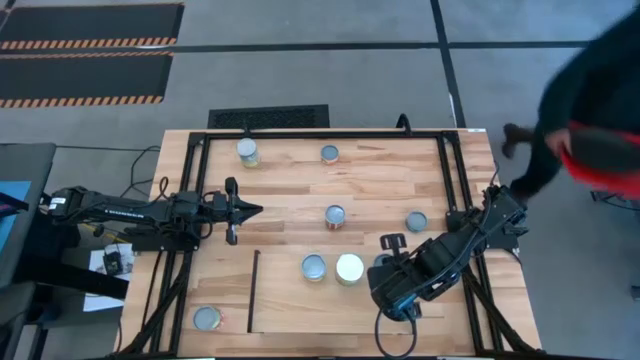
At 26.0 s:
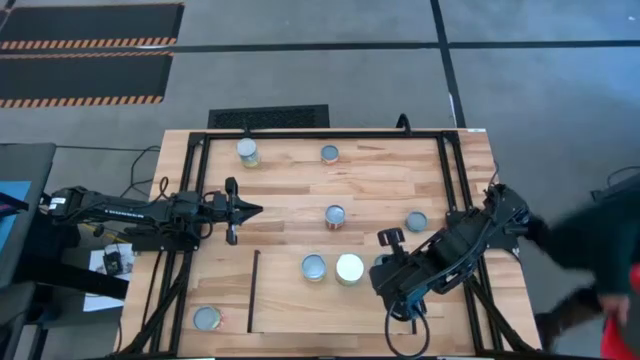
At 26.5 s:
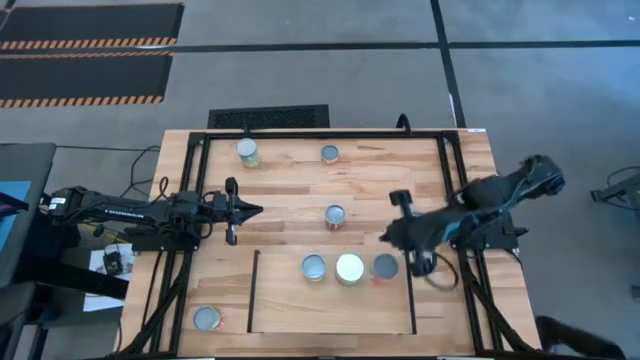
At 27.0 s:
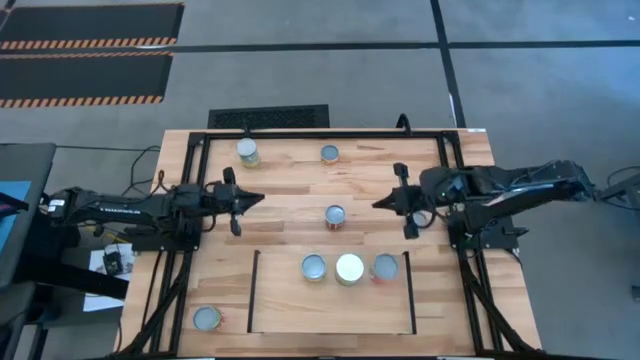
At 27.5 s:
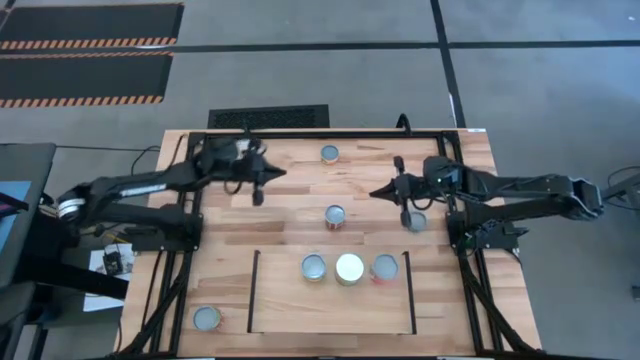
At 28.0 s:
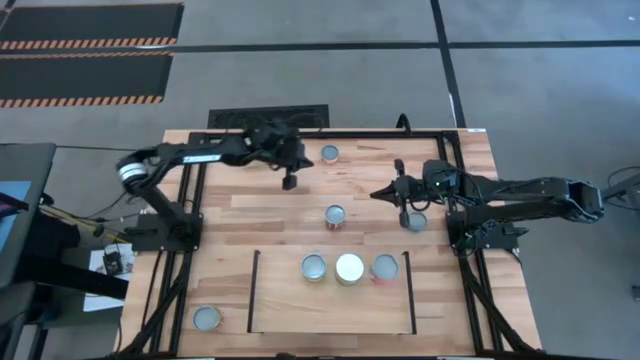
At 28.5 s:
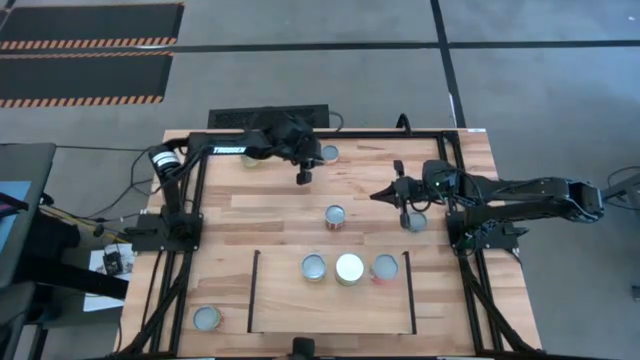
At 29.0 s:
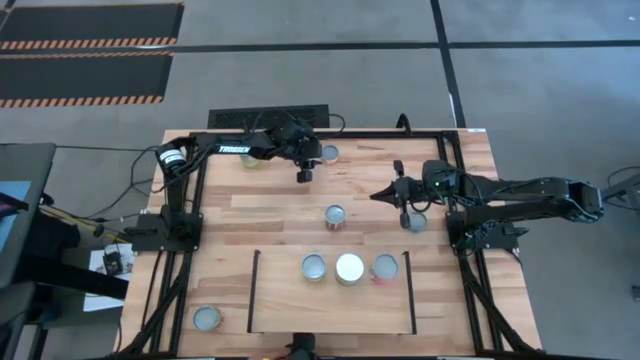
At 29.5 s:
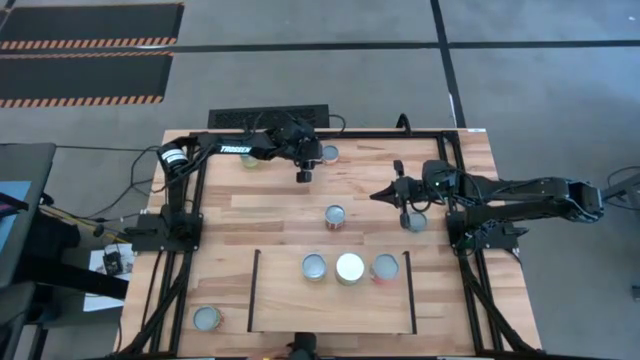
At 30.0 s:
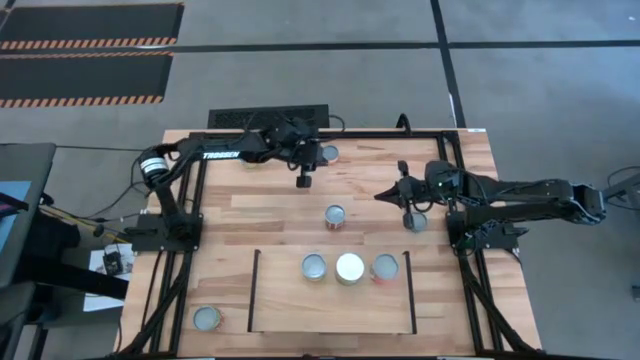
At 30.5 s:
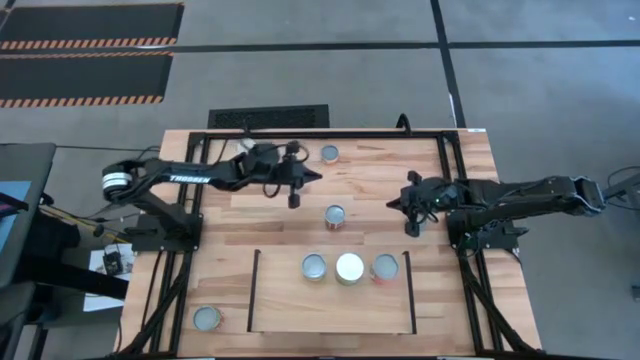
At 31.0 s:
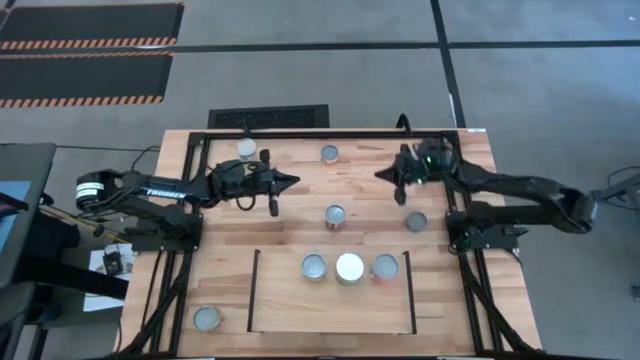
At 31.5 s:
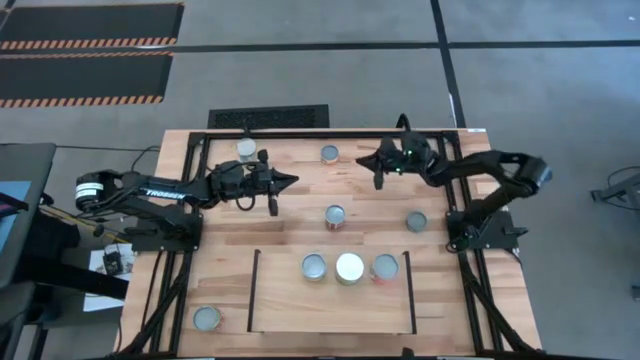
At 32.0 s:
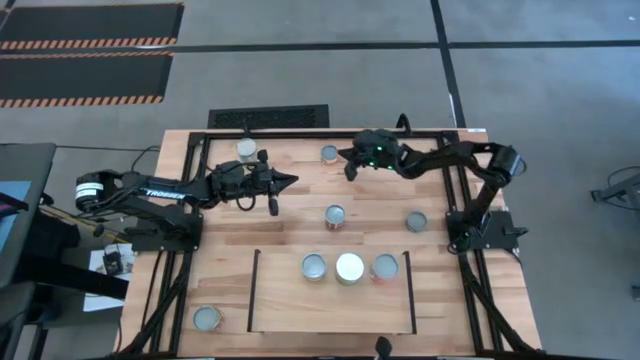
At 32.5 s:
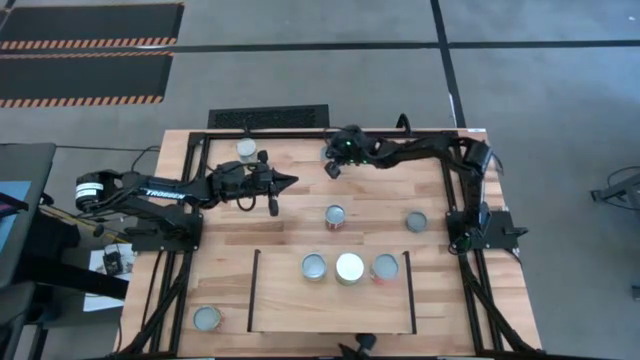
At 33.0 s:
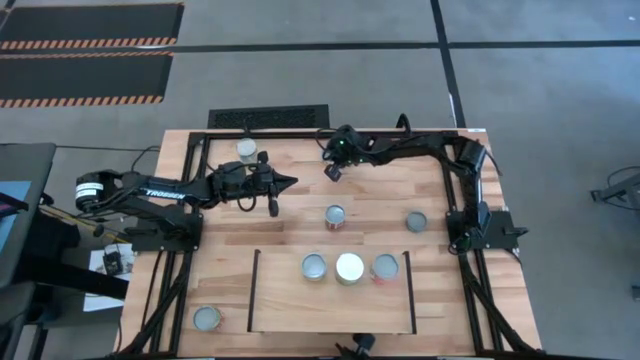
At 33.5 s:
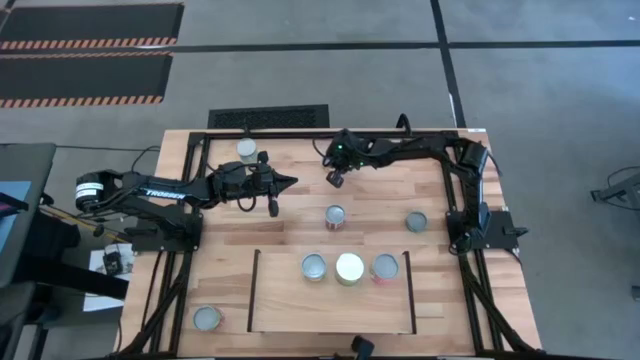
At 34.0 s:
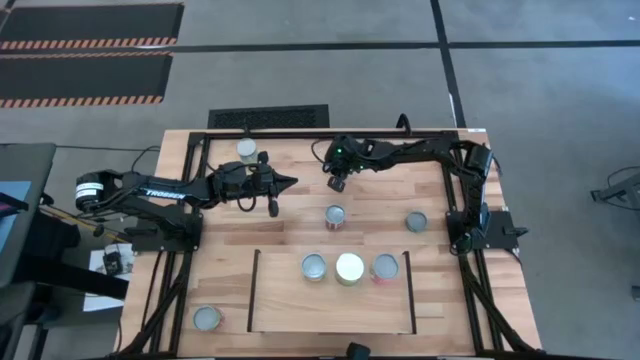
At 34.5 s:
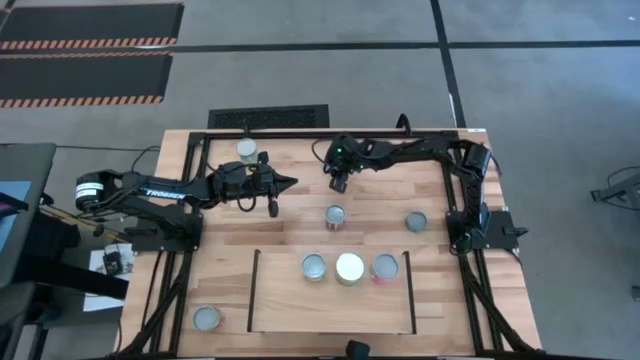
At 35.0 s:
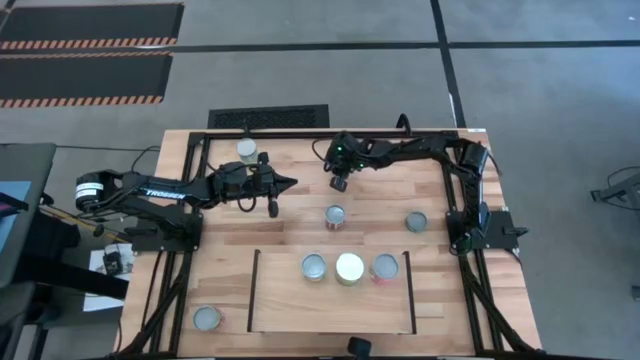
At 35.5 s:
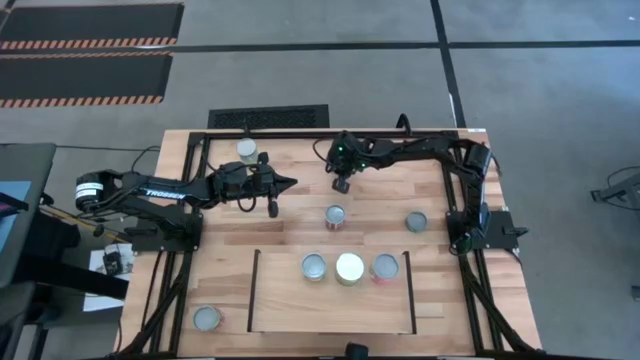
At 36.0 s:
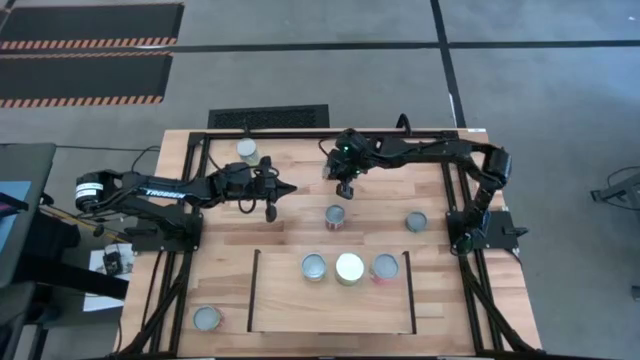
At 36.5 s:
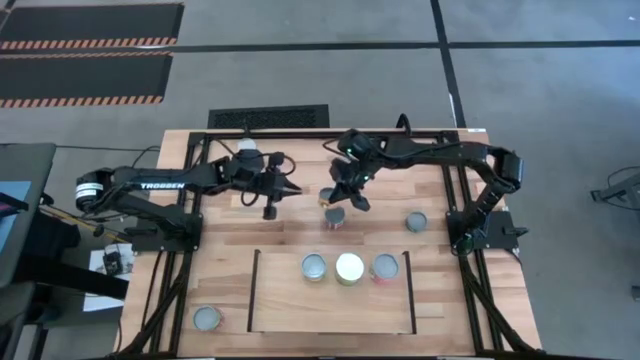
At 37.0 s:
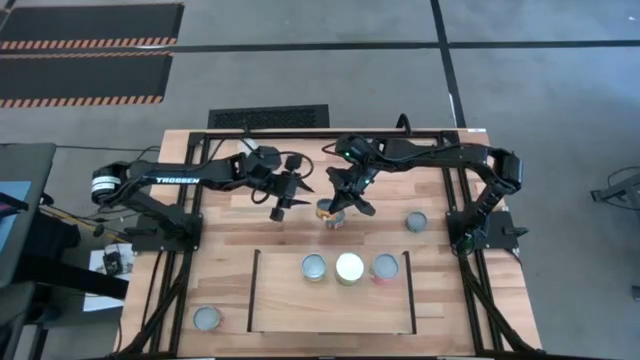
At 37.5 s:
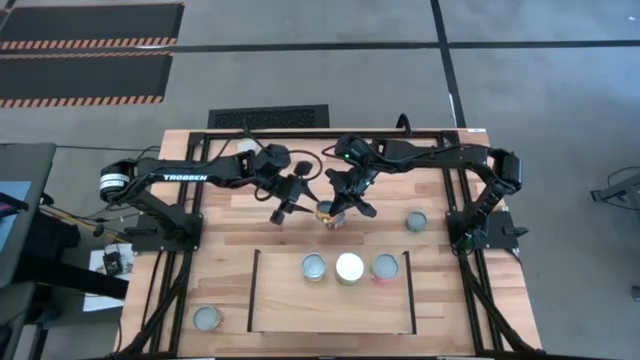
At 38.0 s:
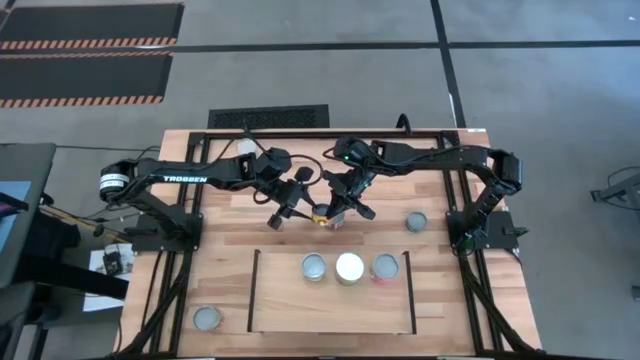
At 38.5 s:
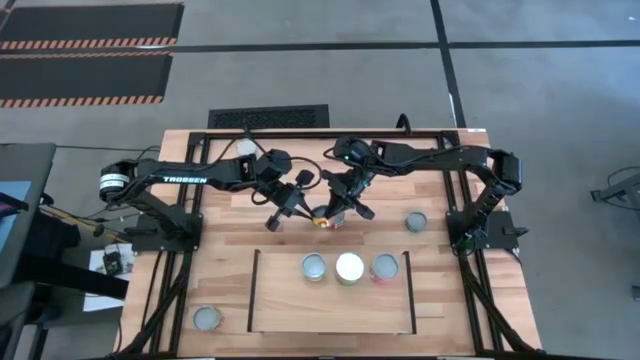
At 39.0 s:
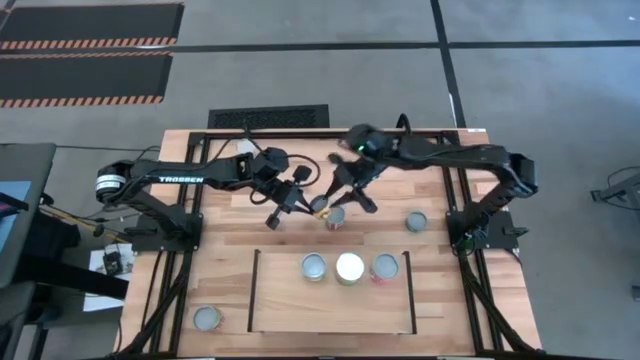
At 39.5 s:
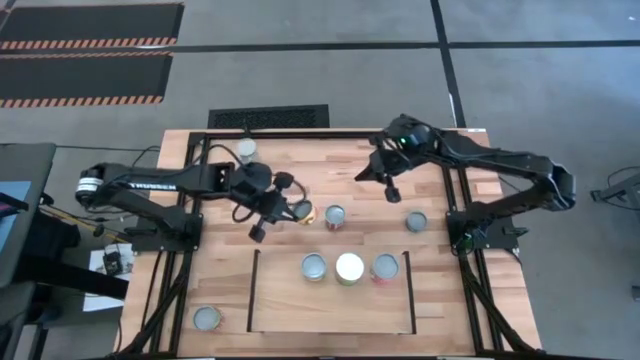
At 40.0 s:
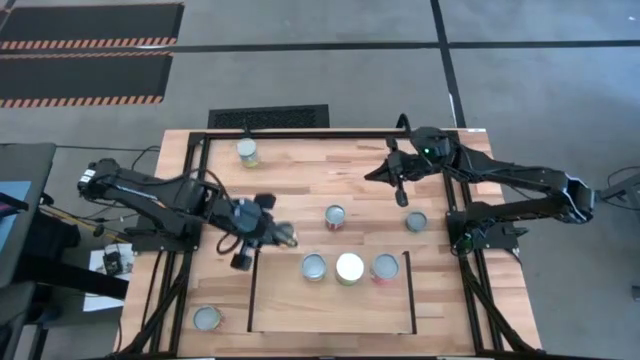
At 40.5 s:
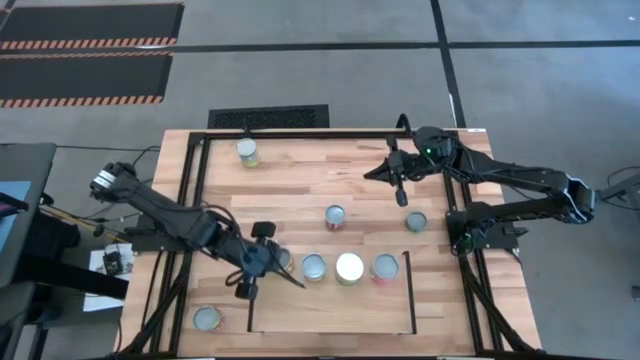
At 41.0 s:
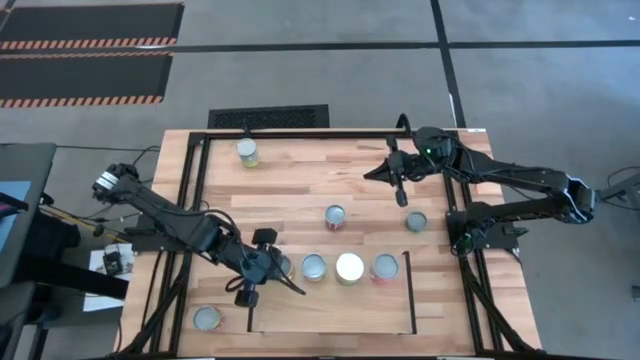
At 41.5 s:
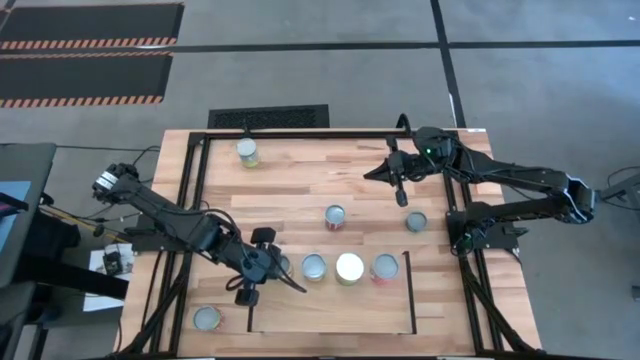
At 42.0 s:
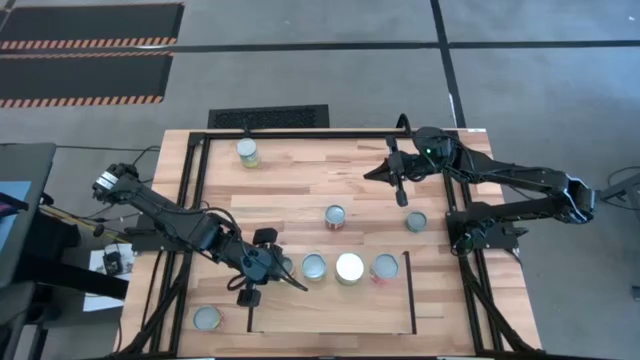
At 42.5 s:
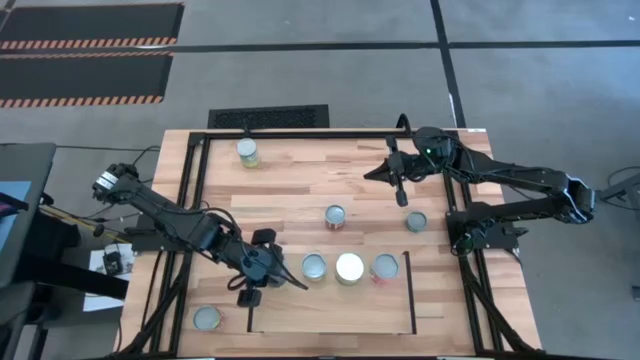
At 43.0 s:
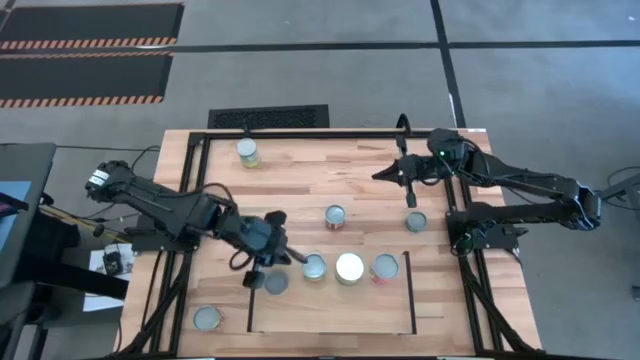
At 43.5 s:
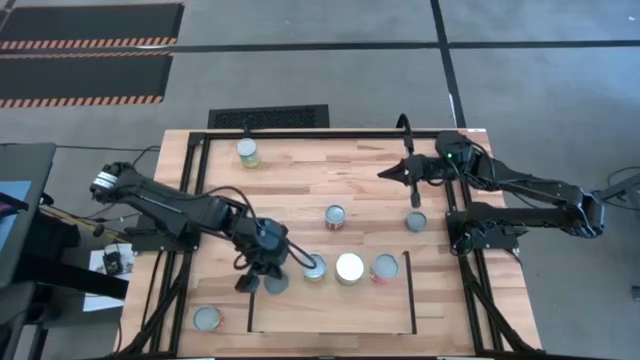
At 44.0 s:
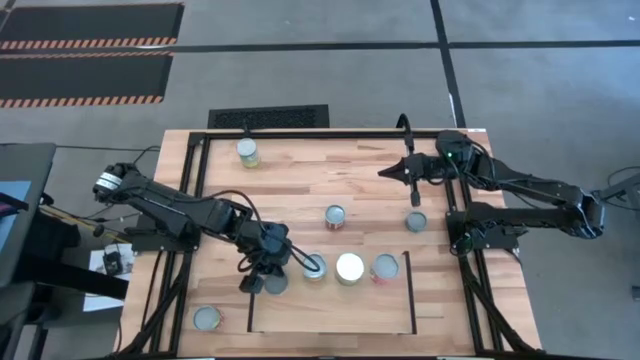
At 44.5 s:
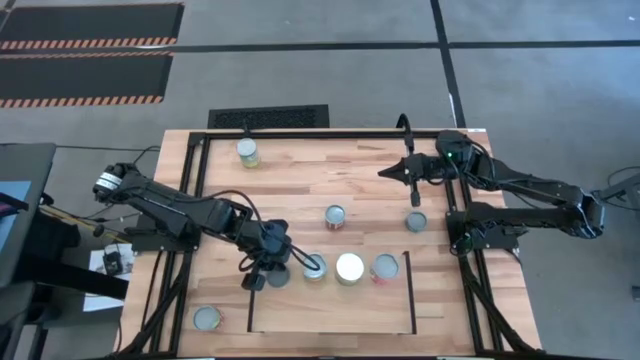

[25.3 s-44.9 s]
Task: Pick and place cans onto a shelf
Put the yellow mushroom can on the shelf

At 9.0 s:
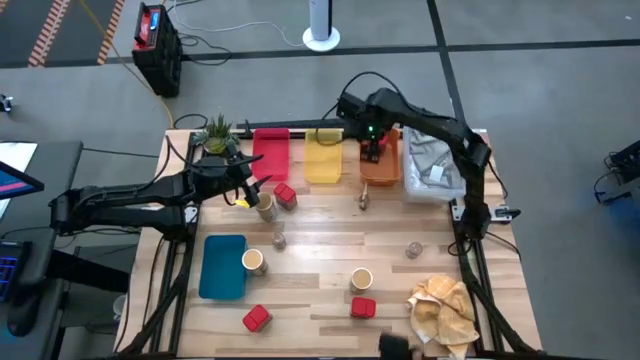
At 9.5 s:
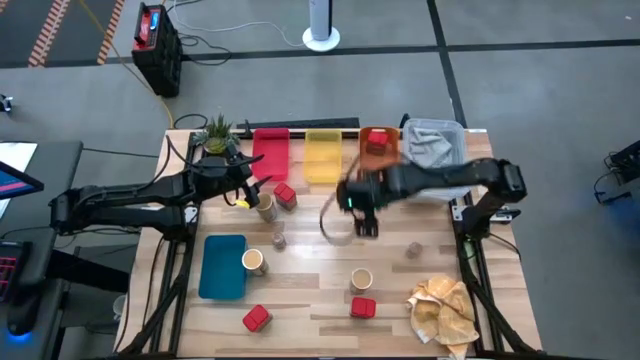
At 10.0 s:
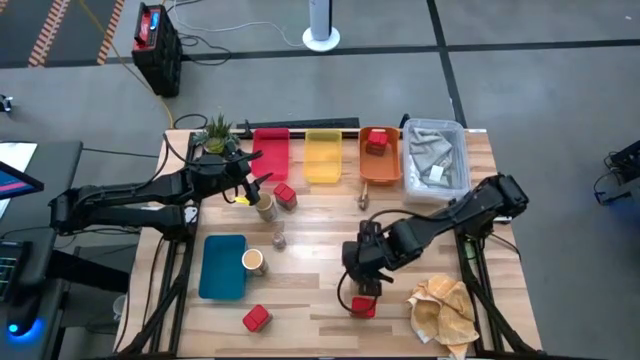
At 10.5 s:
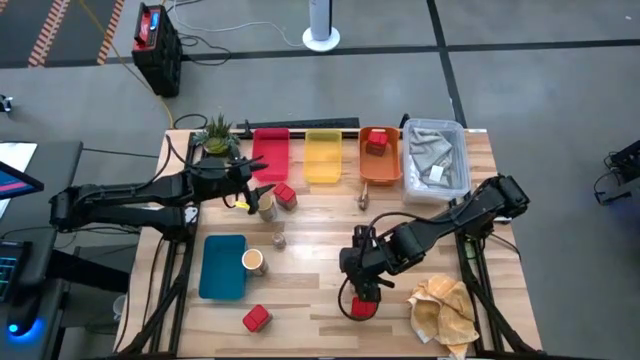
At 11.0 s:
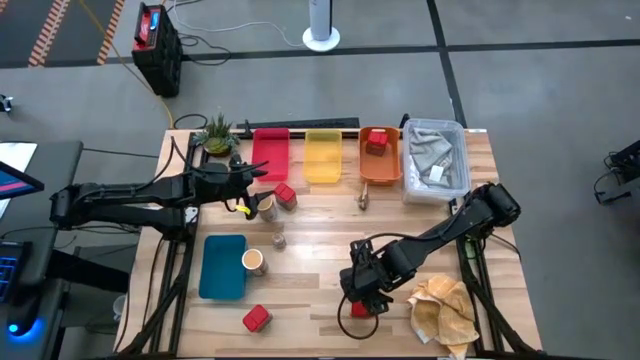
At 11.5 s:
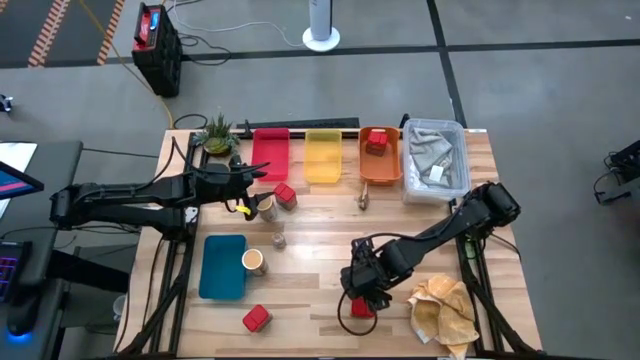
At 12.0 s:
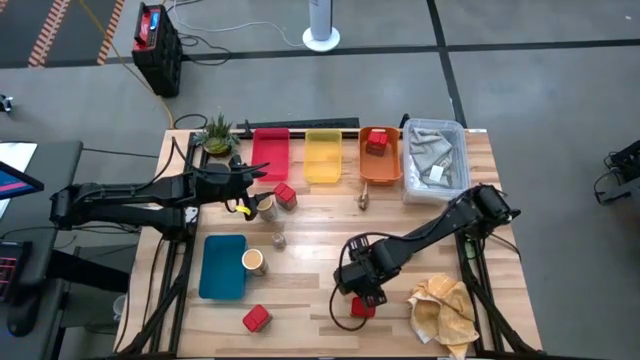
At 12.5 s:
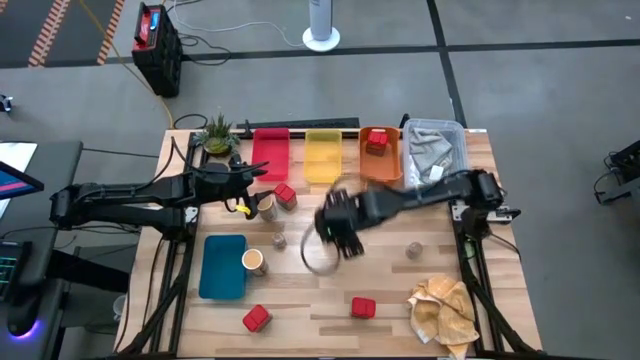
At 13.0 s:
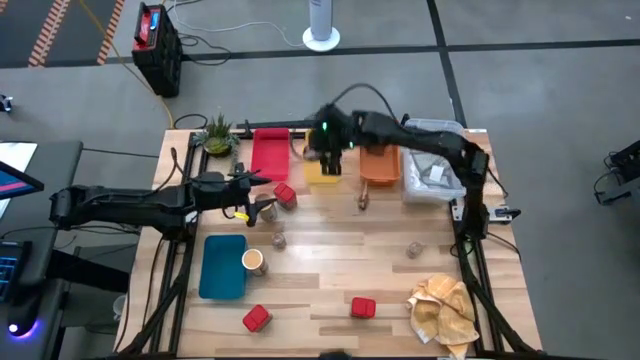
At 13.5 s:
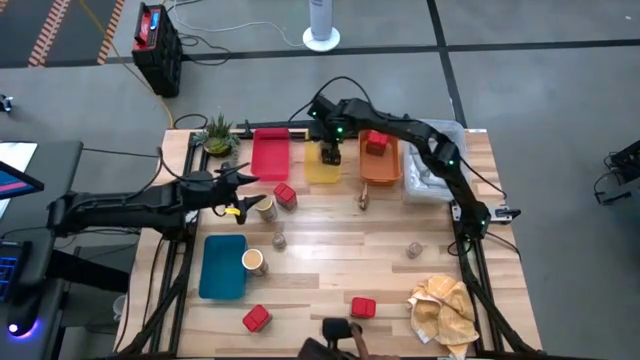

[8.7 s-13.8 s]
Task: Sort spices by type
Put the gold seasoning bottle into the yellow bin
